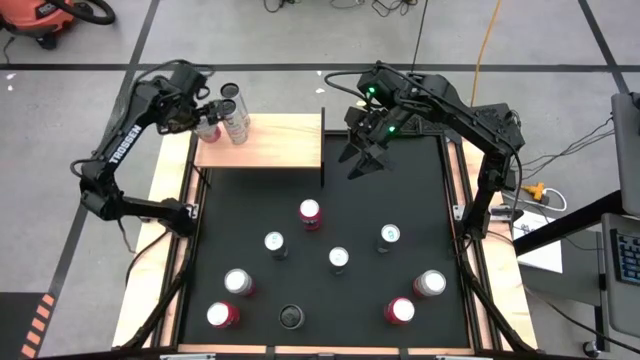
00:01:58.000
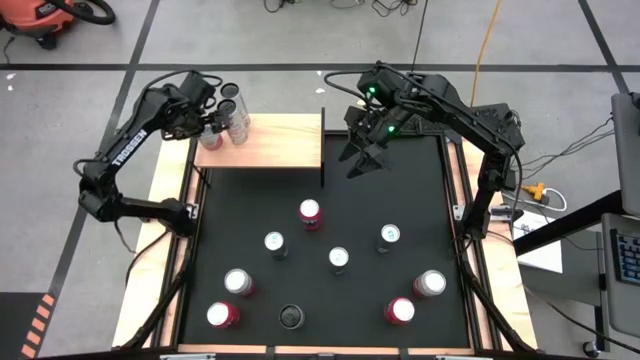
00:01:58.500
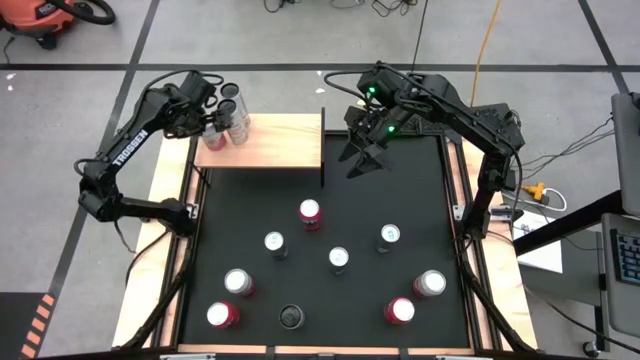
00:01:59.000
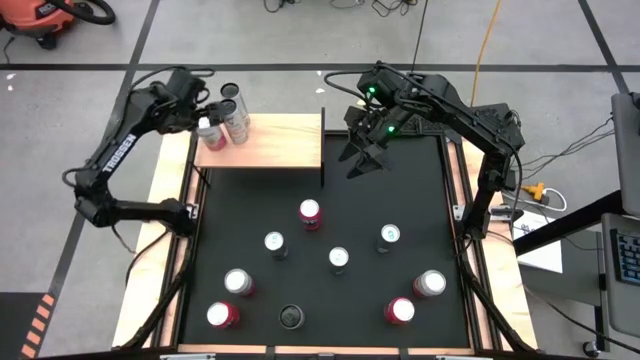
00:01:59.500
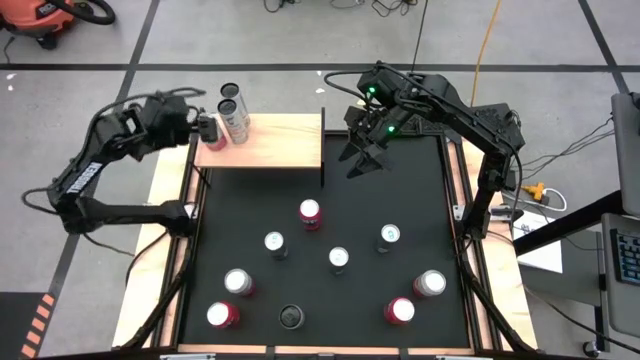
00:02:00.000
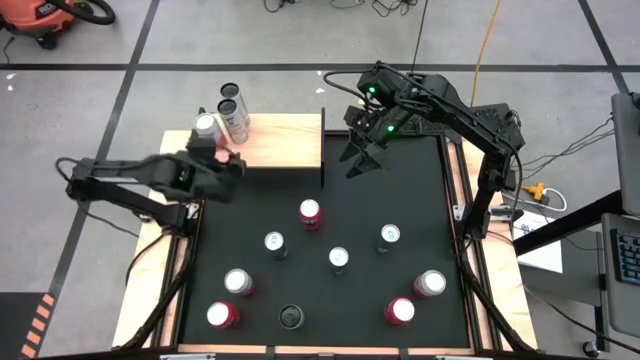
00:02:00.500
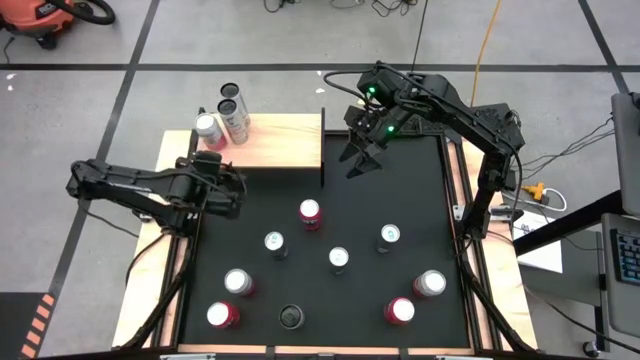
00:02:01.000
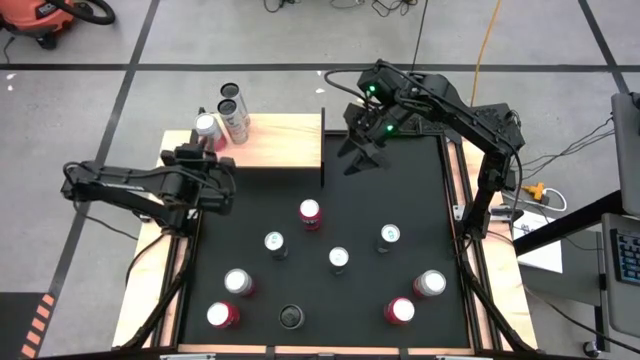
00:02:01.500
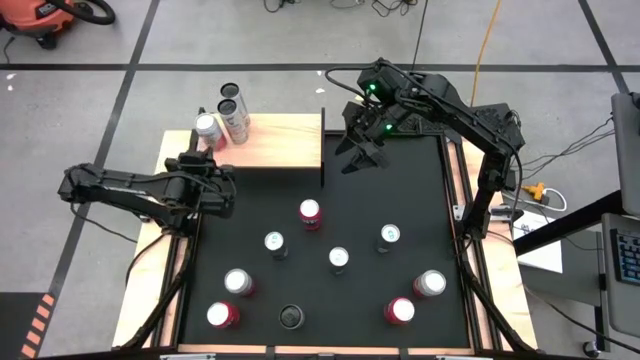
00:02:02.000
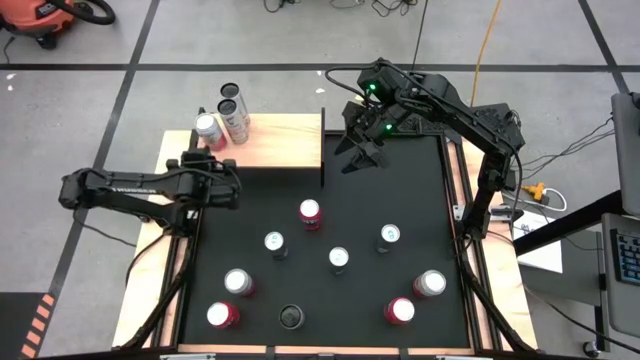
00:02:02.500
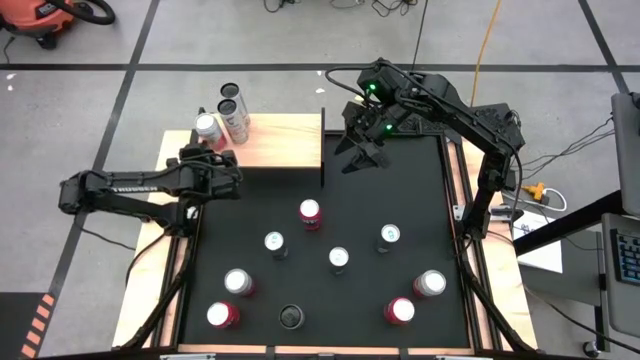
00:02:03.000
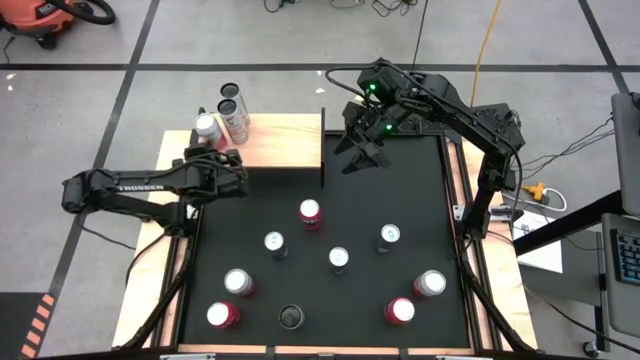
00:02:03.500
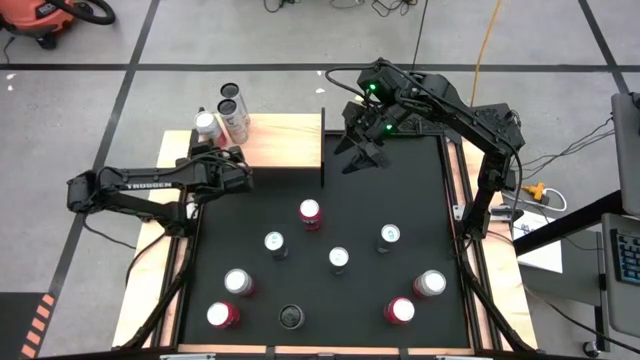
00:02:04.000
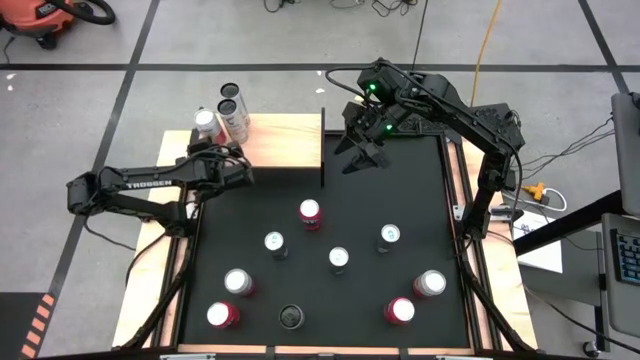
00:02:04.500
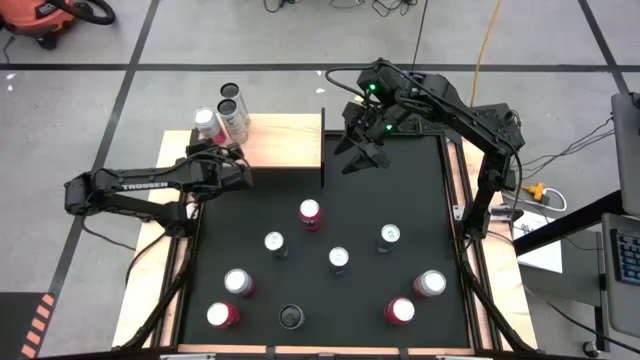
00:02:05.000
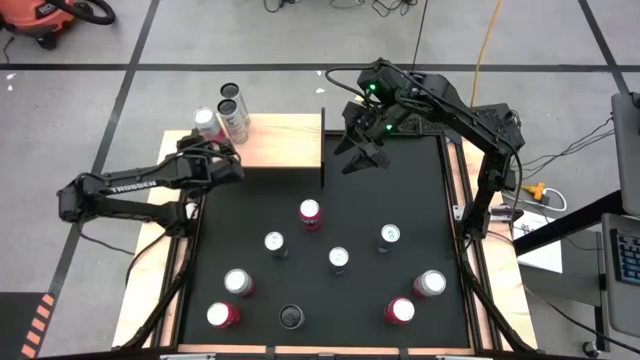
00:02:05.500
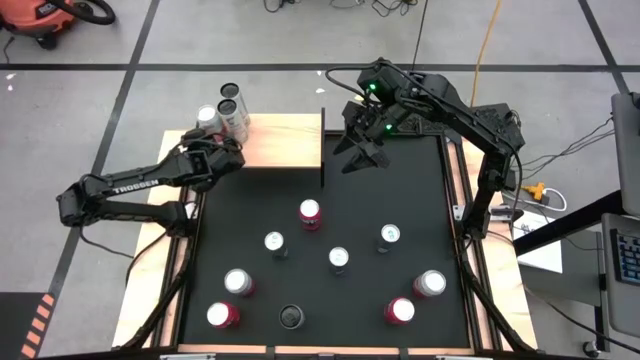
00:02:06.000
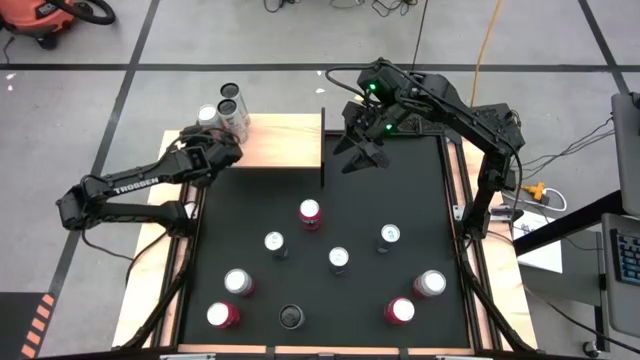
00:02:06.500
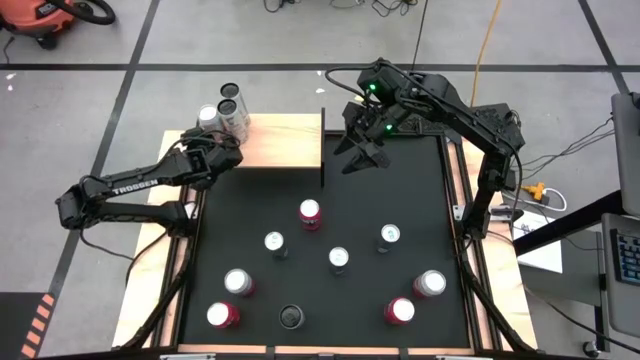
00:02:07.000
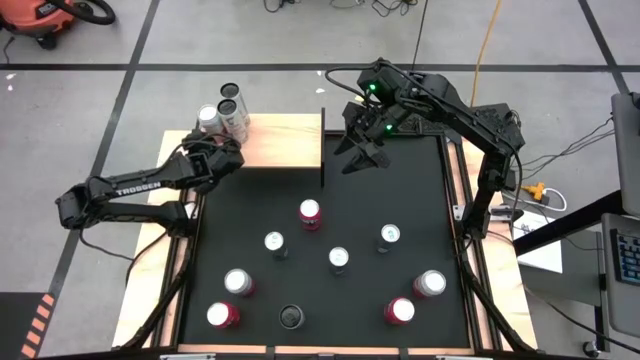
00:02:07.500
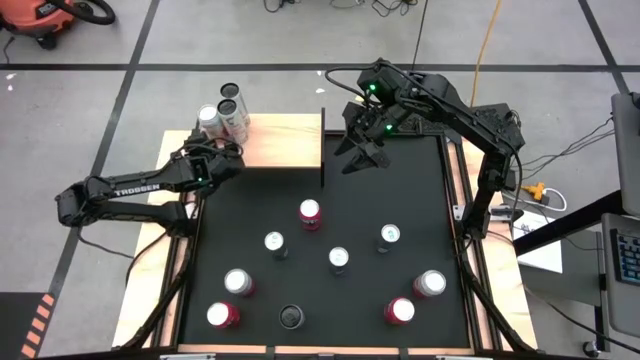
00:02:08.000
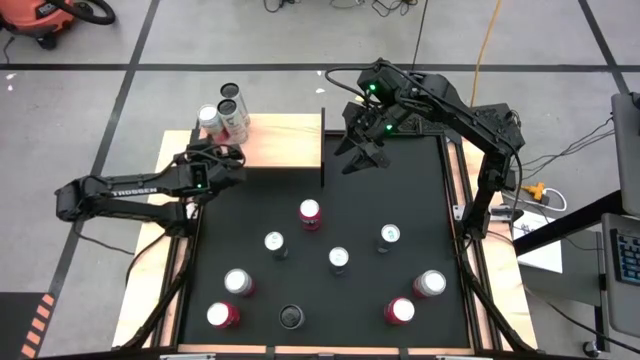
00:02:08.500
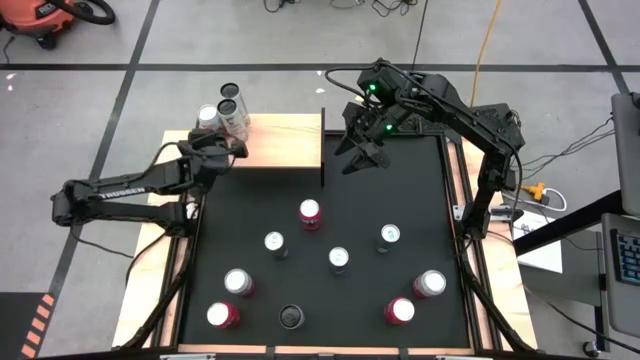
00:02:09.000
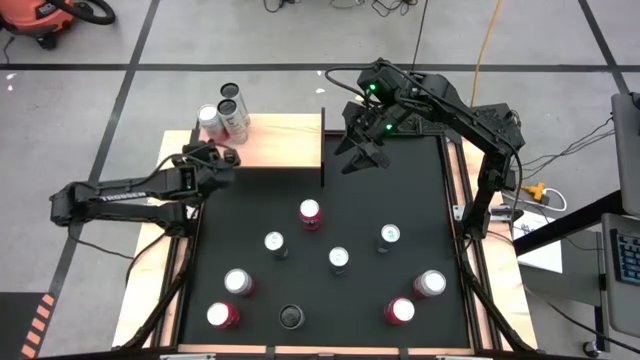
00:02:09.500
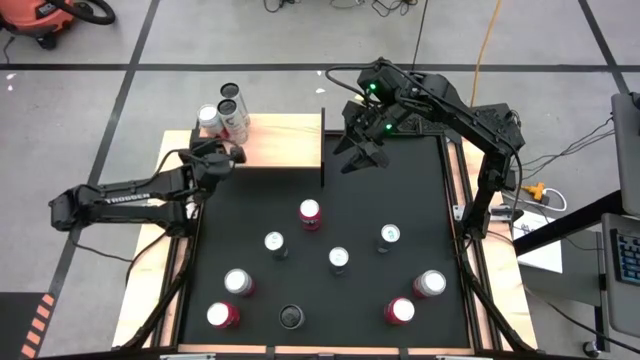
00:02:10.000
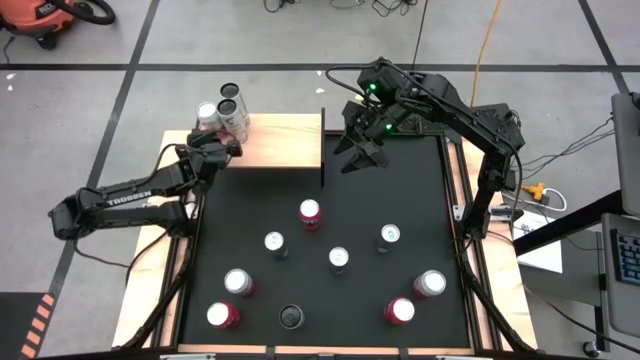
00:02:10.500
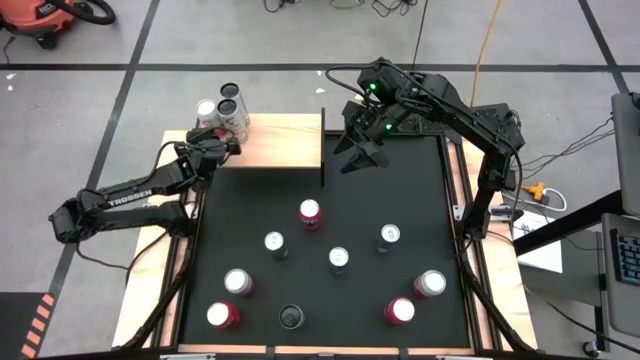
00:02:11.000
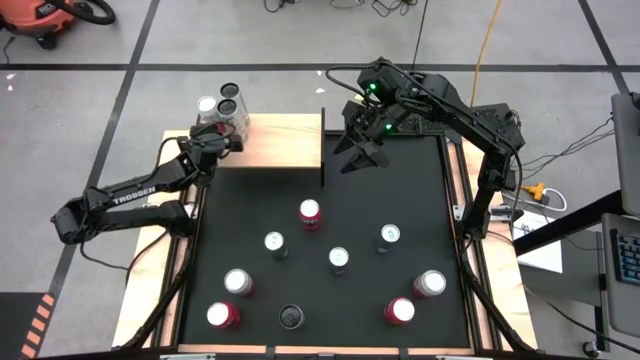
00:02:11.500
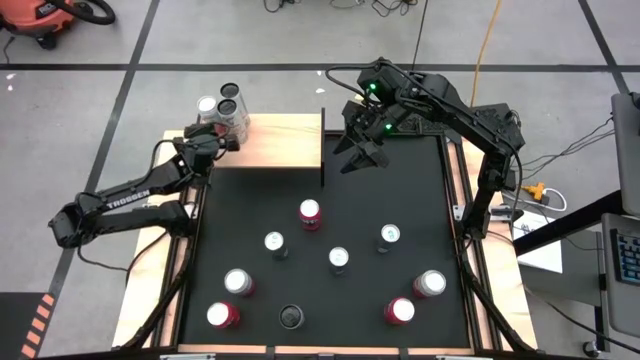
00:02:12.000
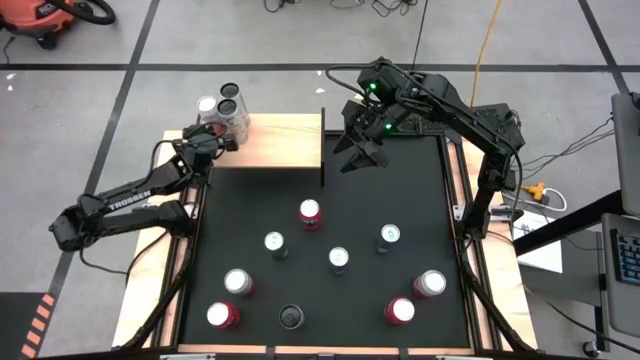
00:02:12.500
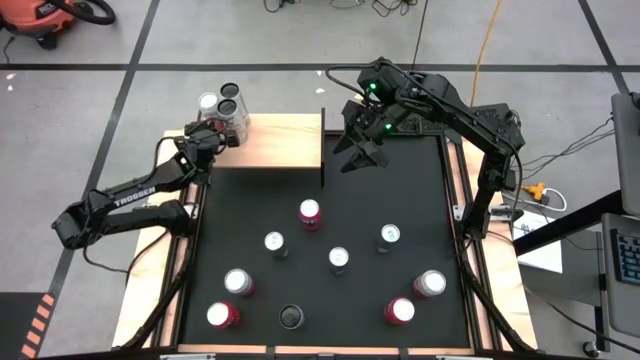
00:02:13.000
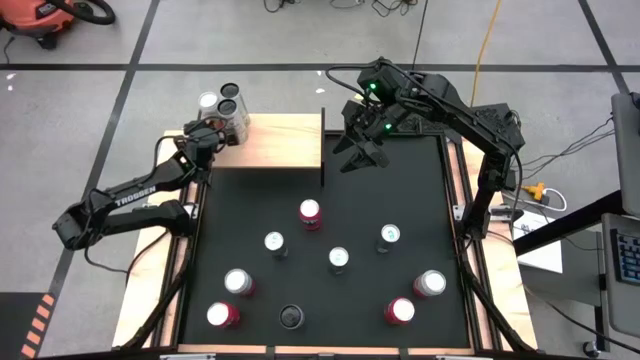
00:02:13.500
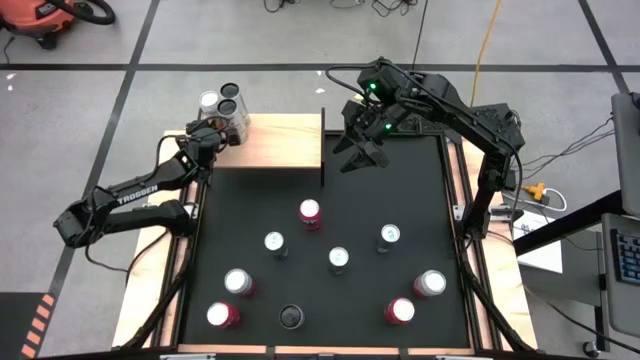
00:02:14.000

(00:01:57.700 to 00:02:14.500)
Task: Place canned beverage on shelf
Put the top pink soda can on the shelf

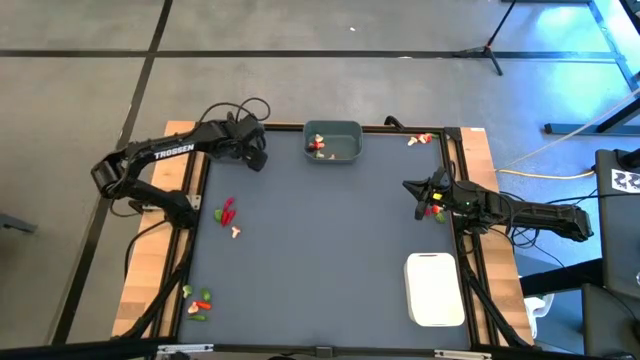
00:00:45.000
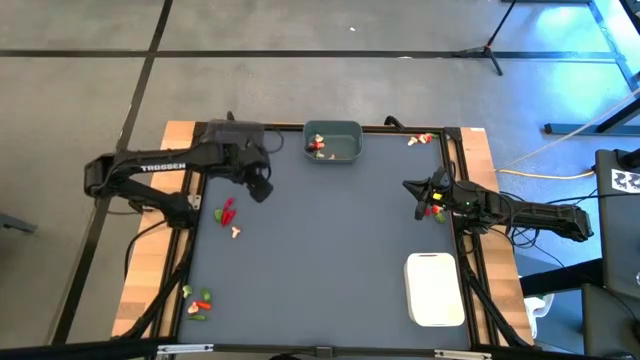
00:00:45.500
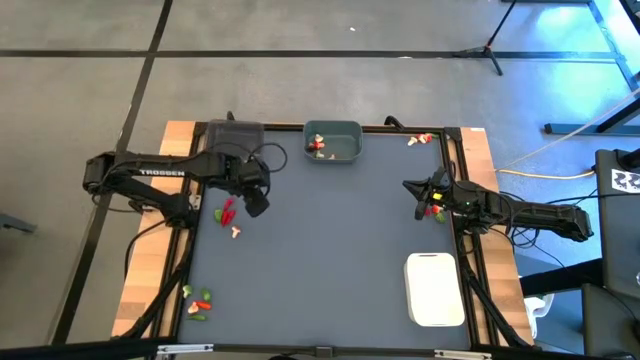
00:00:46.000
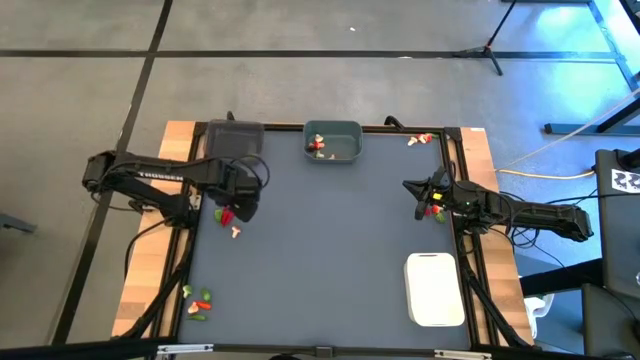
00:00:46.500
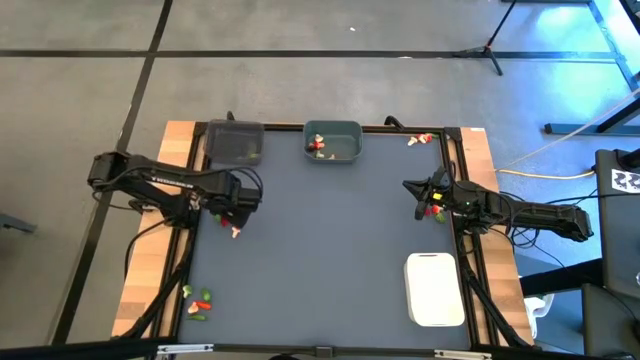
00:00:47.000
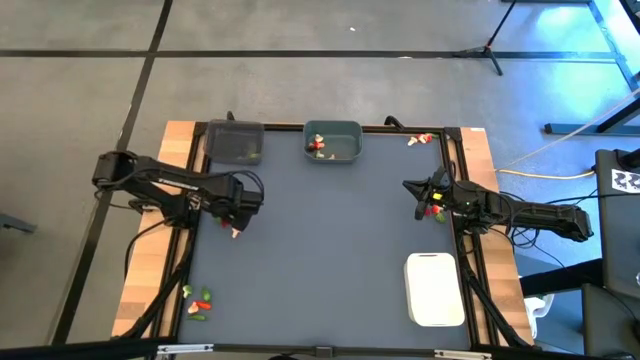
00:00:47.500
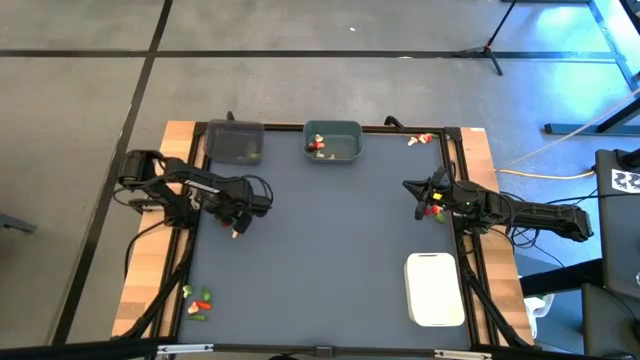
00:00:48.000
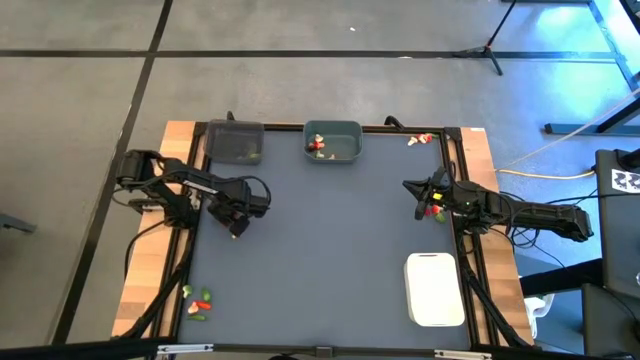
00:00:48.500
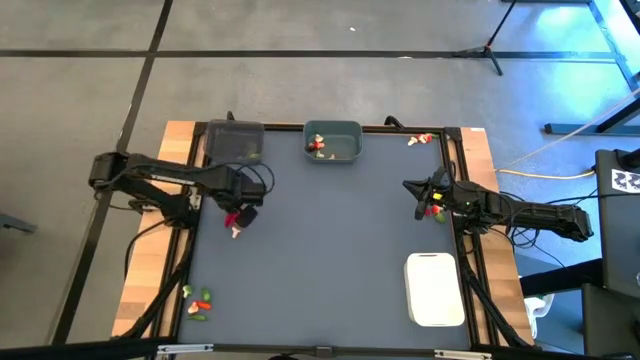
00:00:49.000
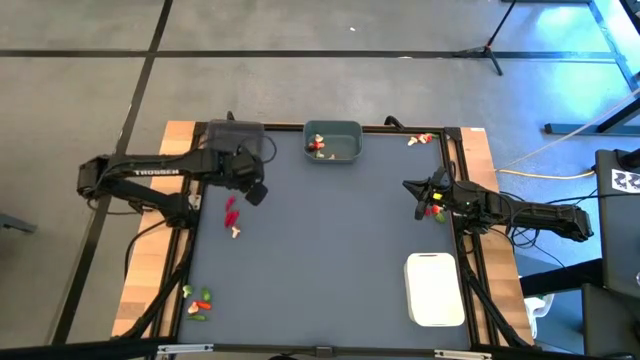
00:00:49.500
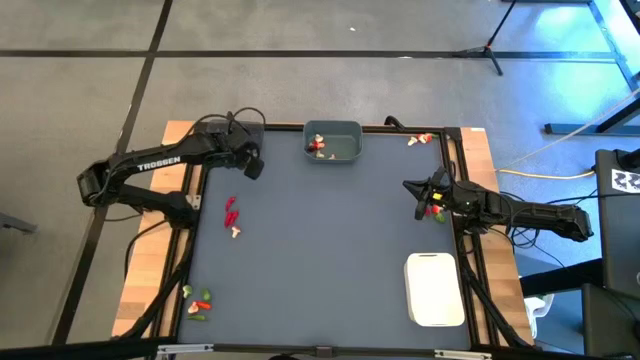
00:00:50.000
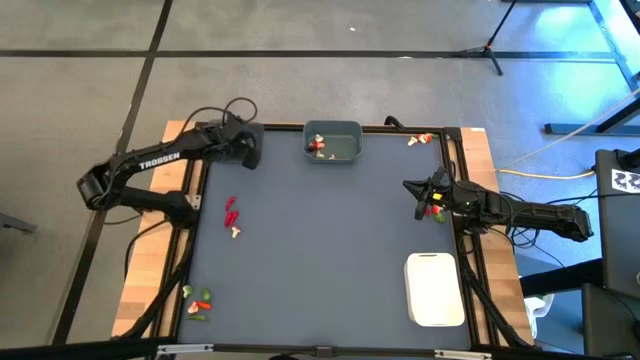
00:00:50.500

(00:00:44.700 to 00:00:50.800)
Task: Sort produce into baskets
Put the green chili pepper into the black bin
